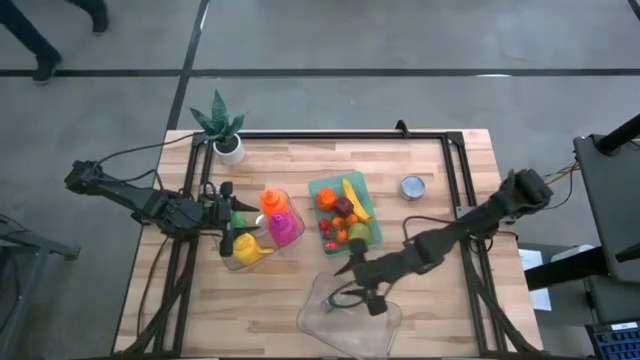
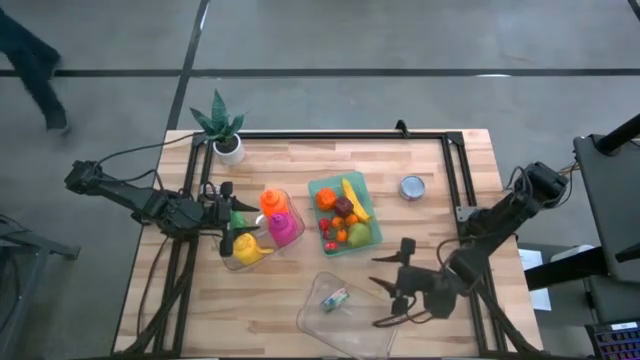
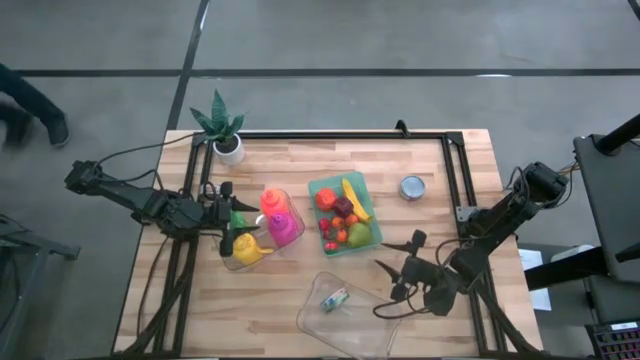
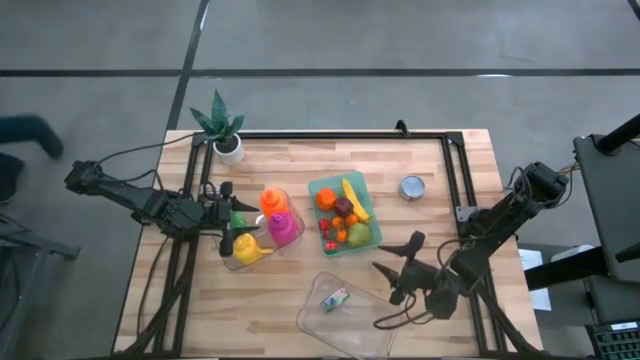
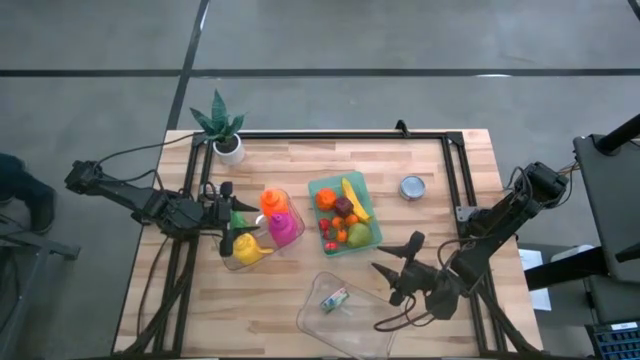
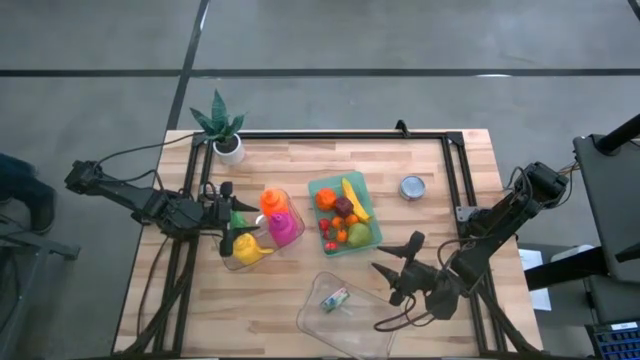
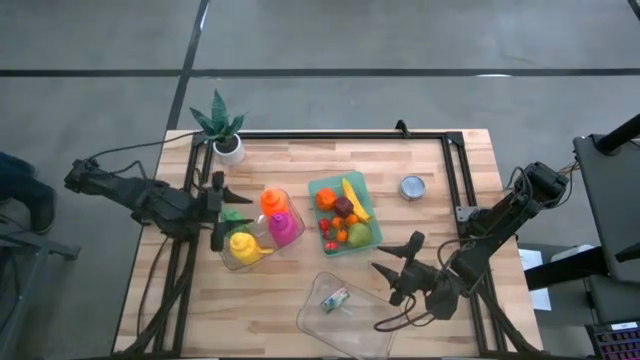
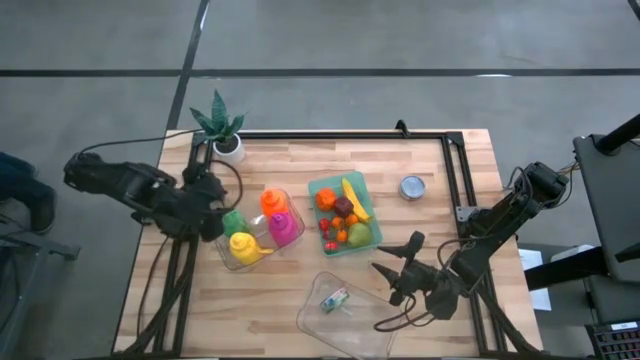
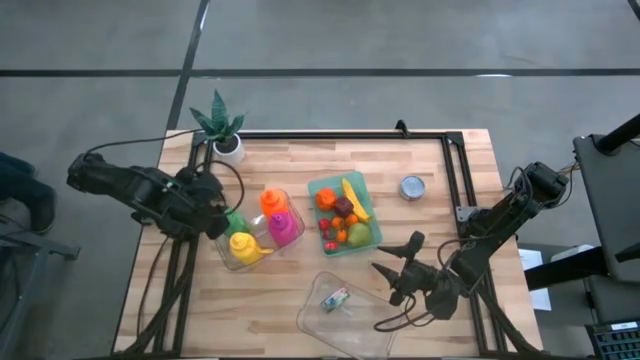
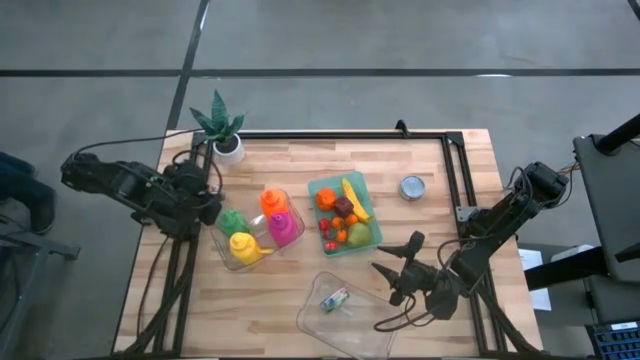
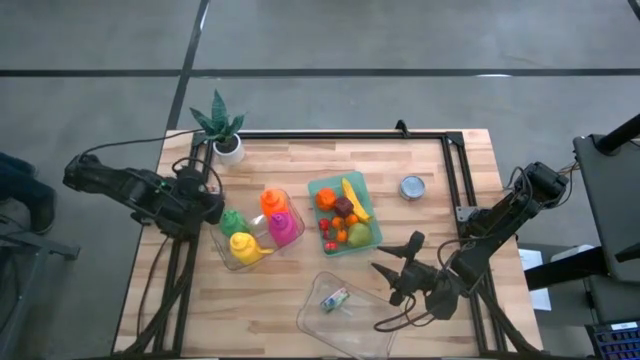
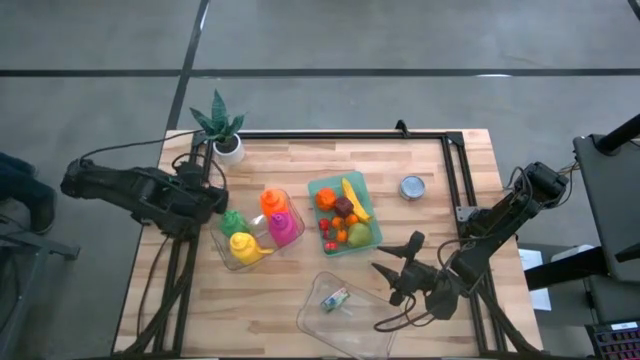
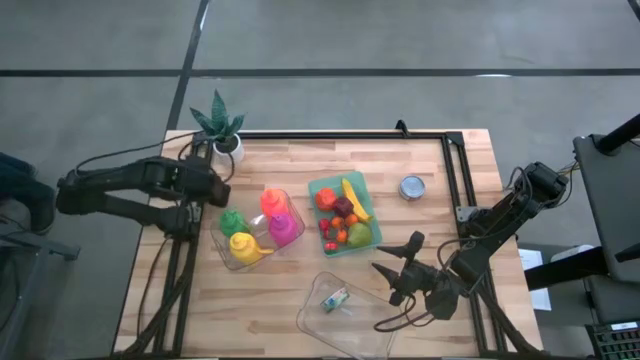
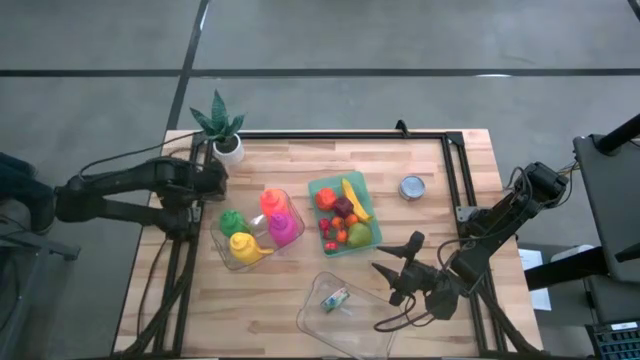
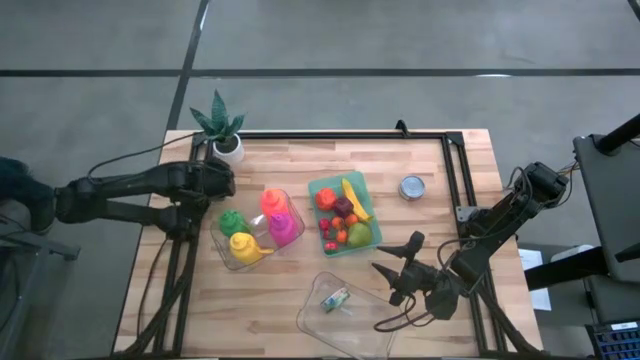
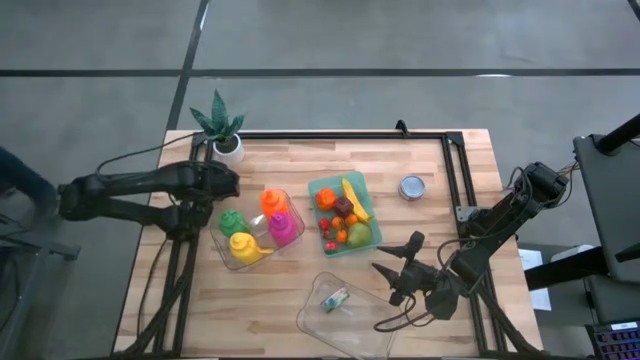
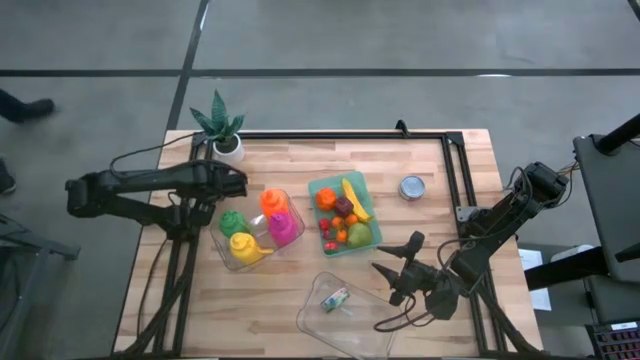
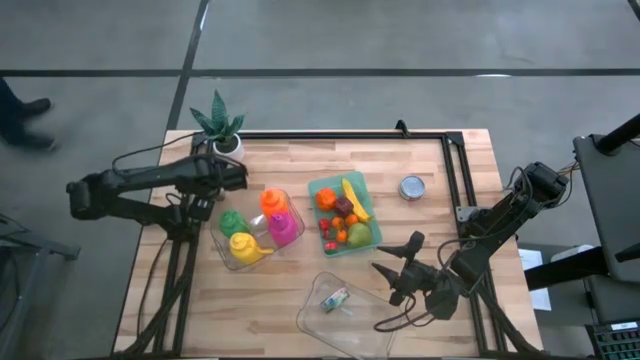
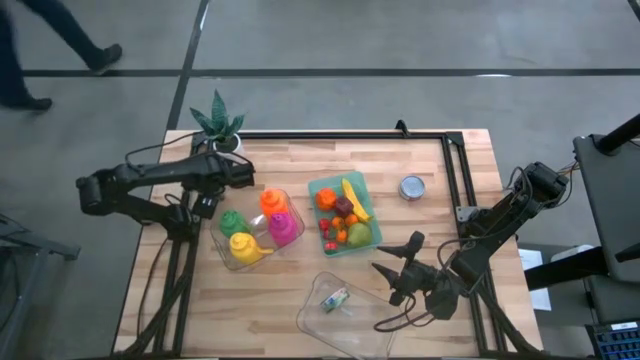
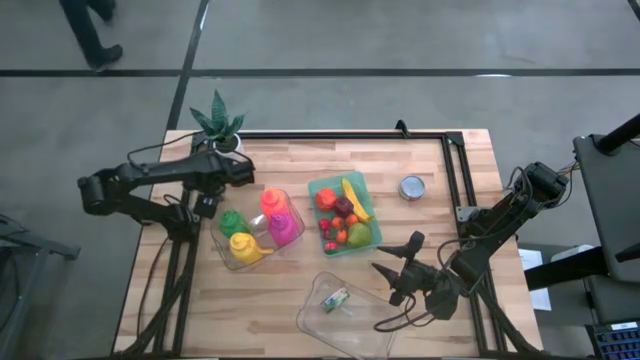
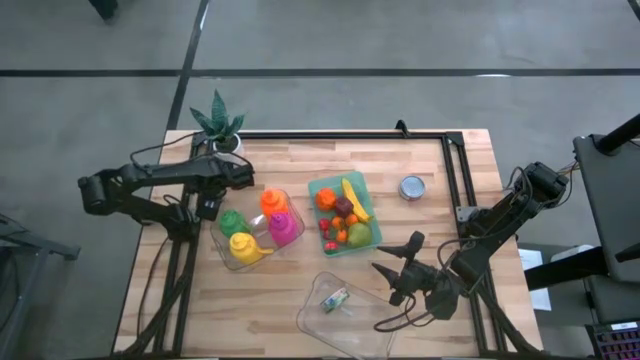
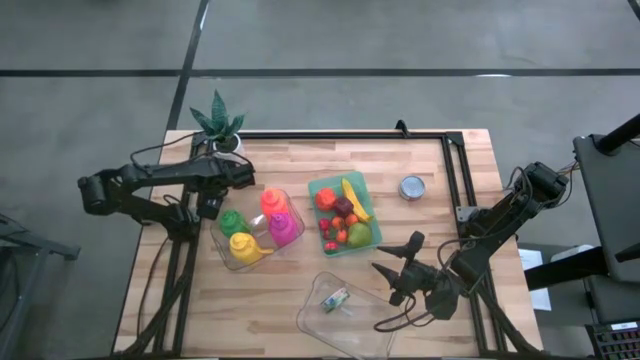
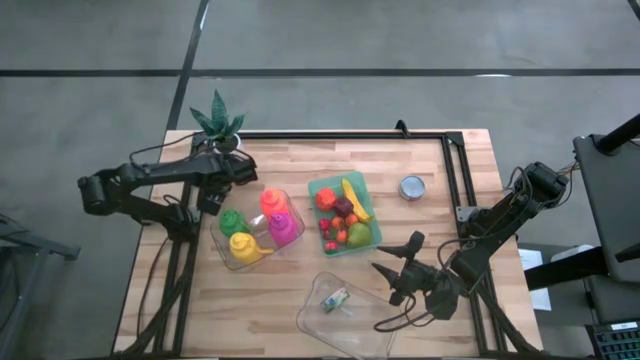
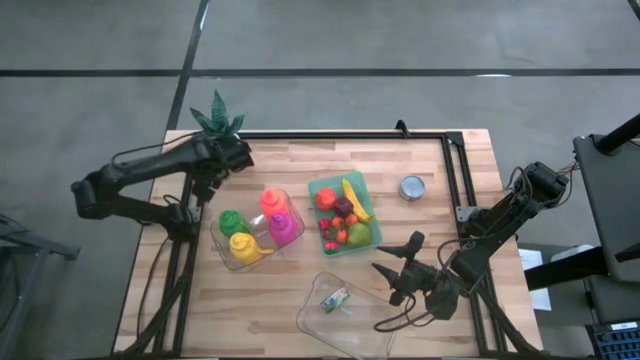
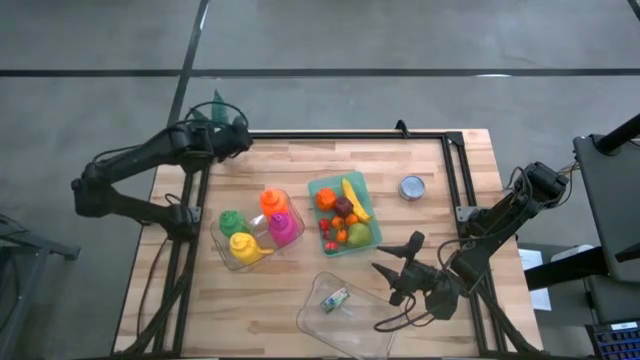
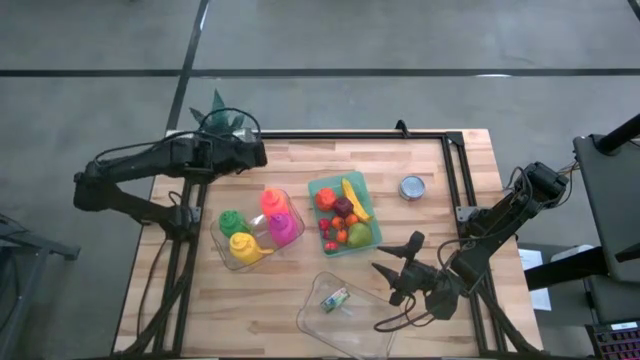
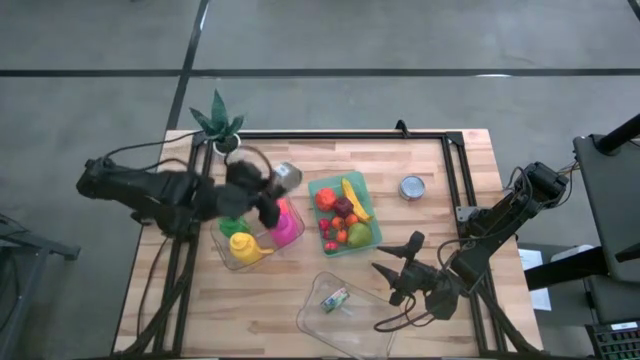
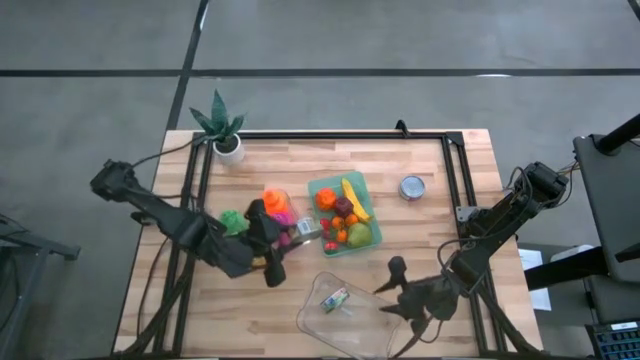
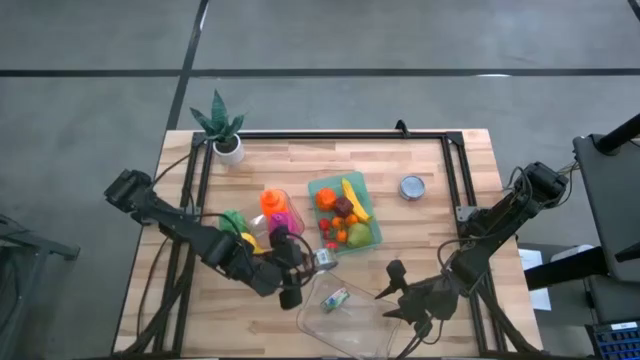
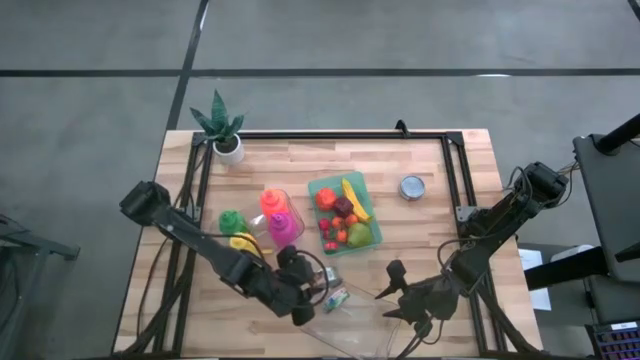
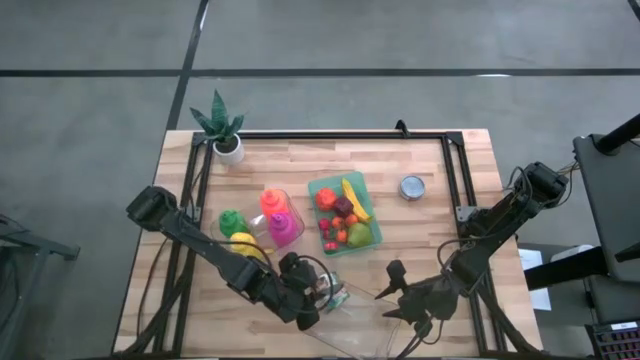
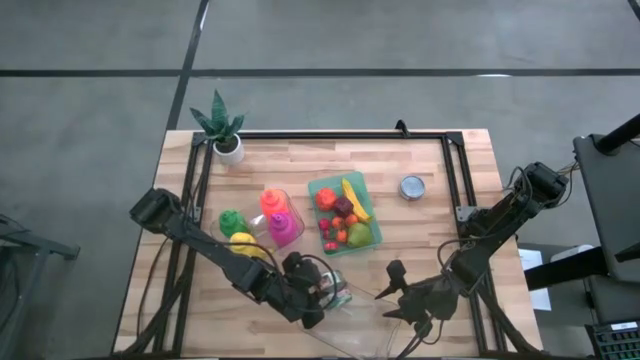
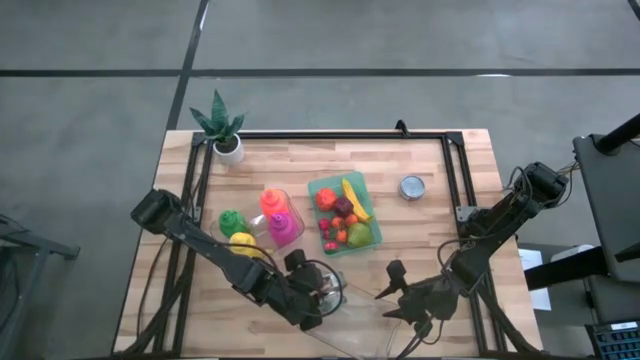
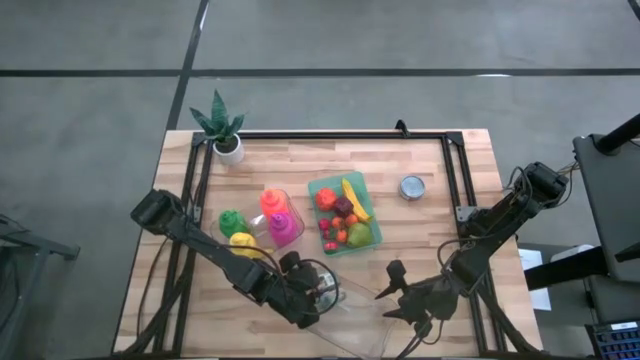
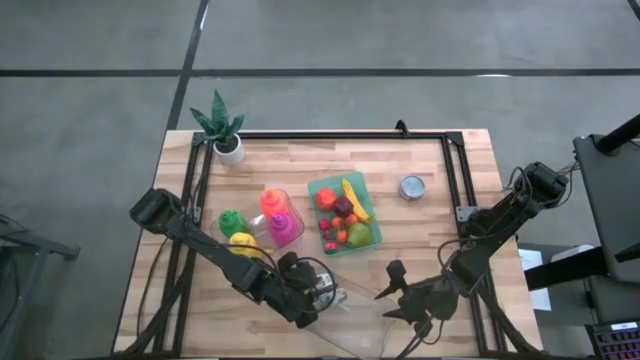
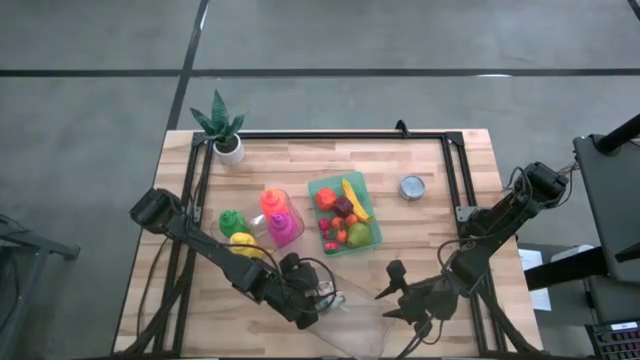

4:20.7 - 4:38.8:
Task: Pick & Place Food Item
Put the green tuna can into the bottom transparent bin

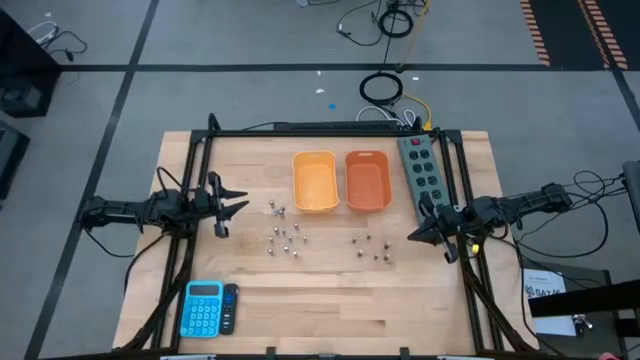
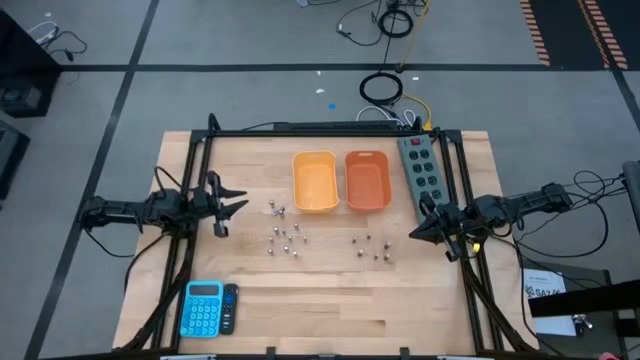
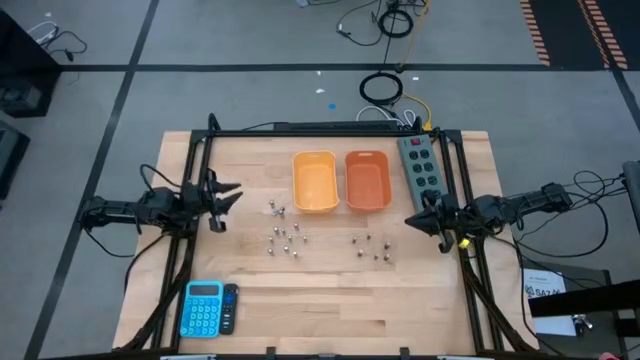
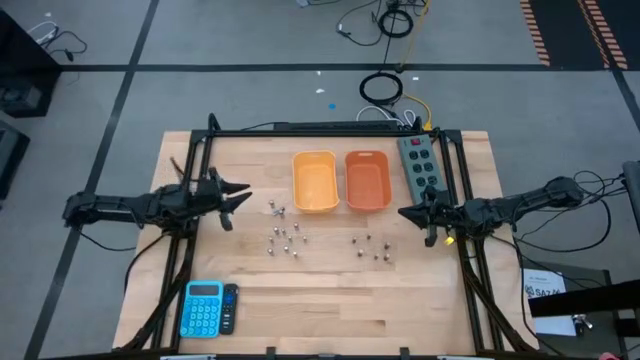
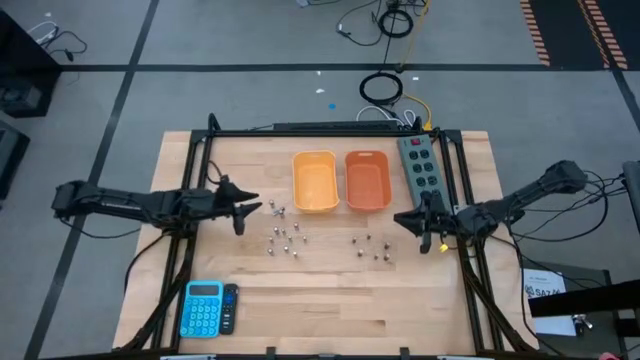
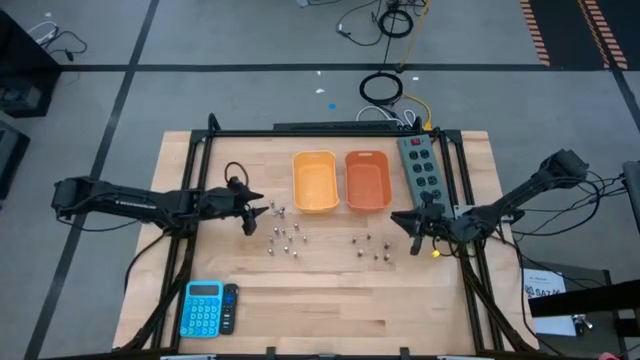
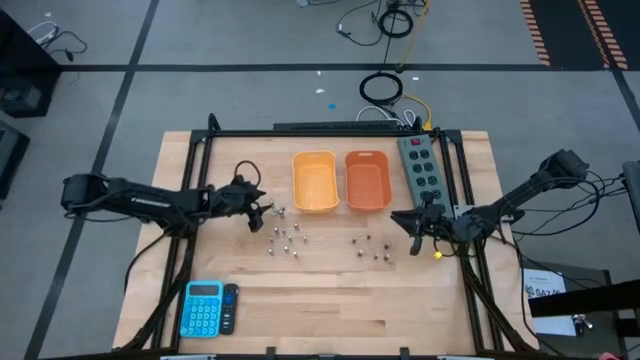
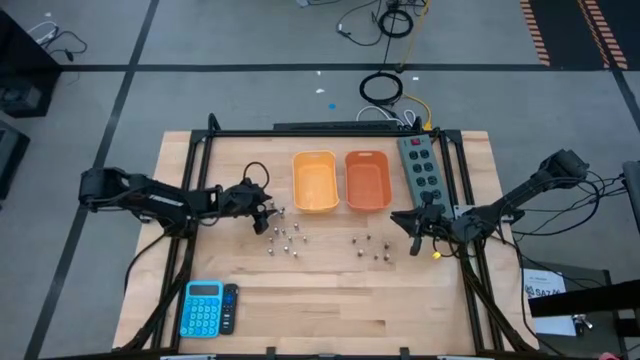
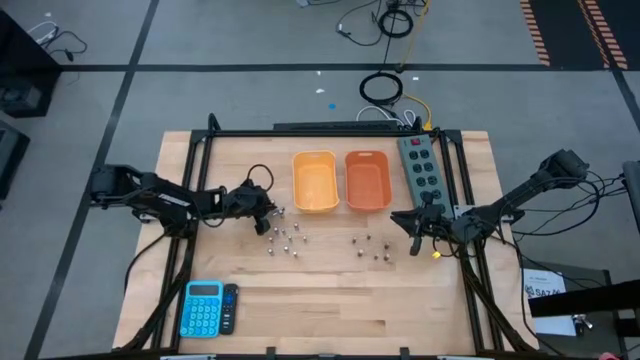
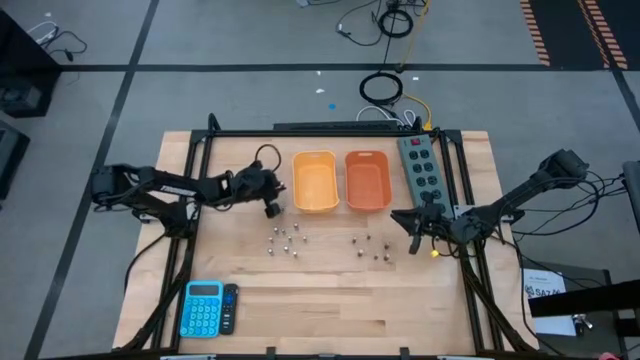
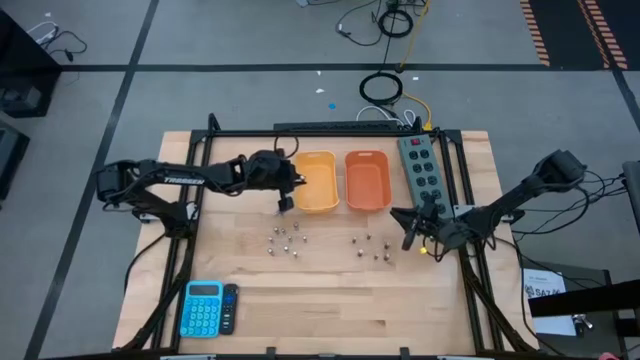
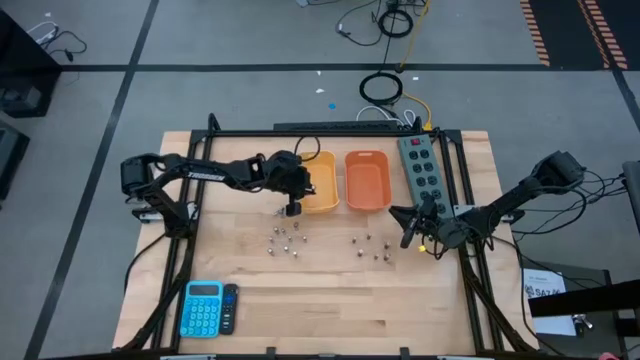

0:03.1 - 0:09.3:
Task: Sort batteries
Put the silver battery into the yellow bin
